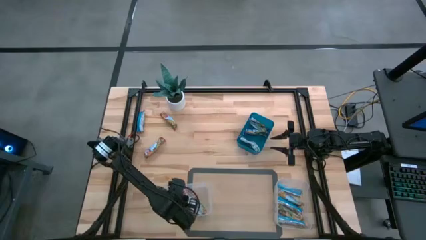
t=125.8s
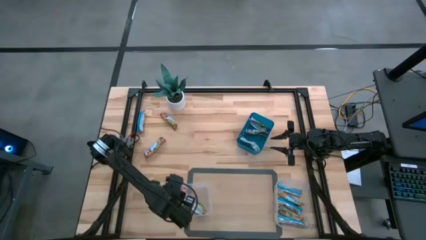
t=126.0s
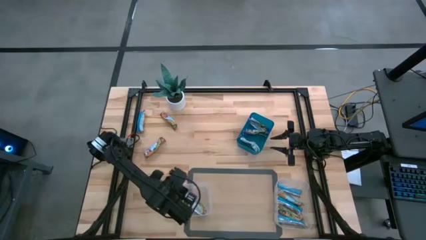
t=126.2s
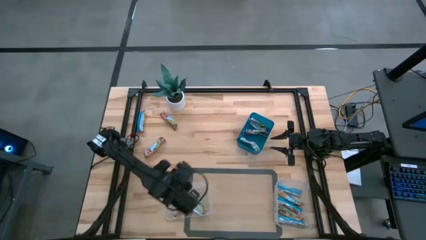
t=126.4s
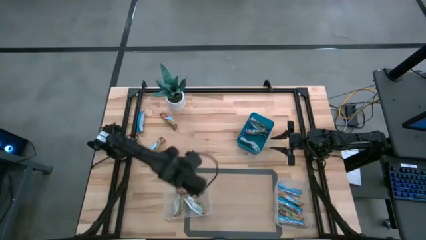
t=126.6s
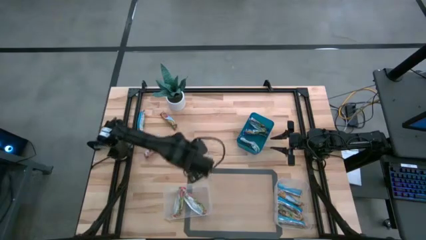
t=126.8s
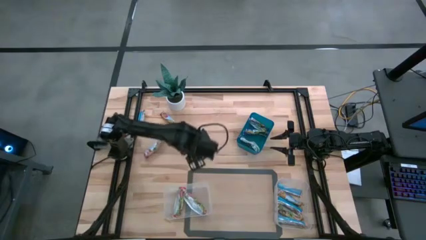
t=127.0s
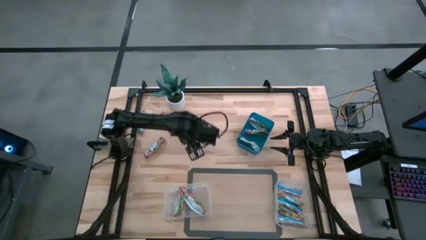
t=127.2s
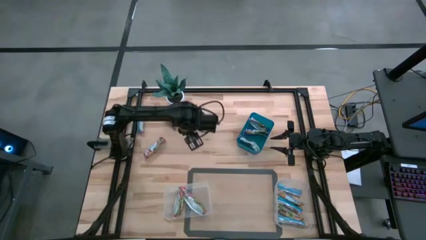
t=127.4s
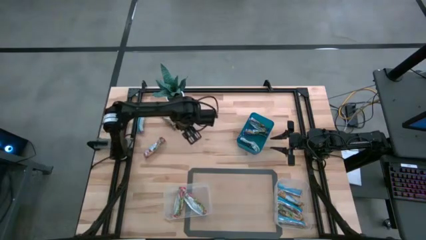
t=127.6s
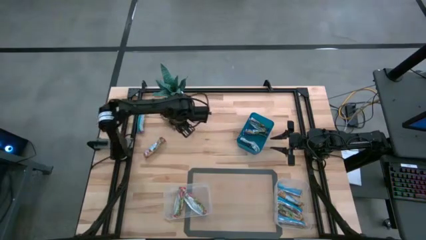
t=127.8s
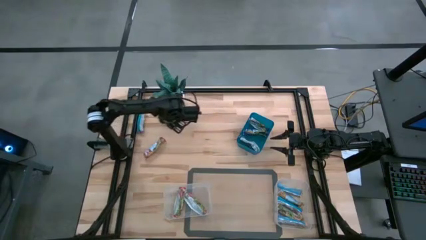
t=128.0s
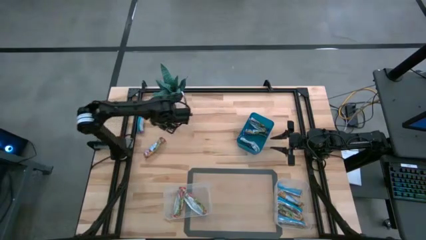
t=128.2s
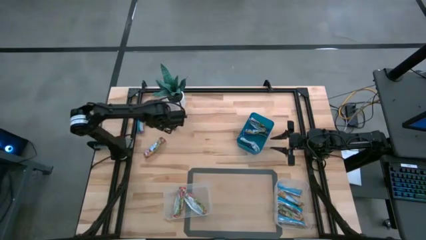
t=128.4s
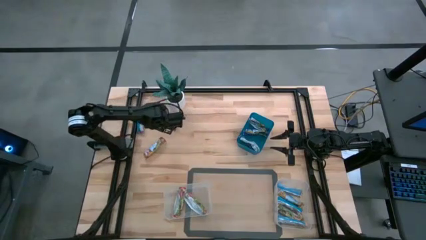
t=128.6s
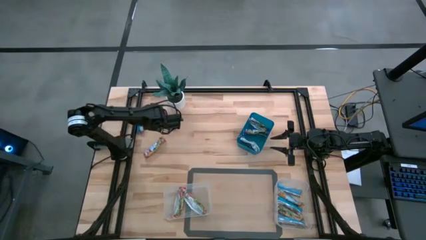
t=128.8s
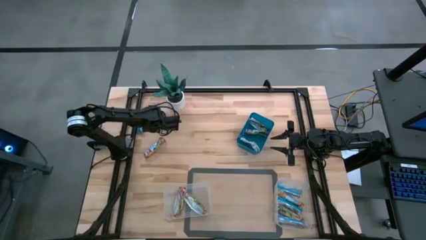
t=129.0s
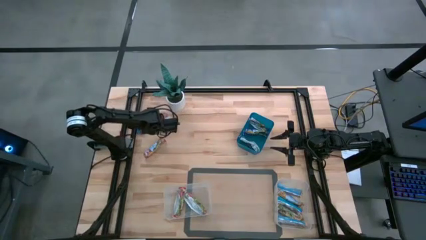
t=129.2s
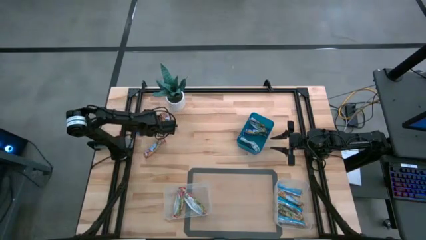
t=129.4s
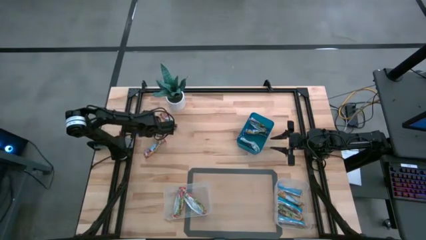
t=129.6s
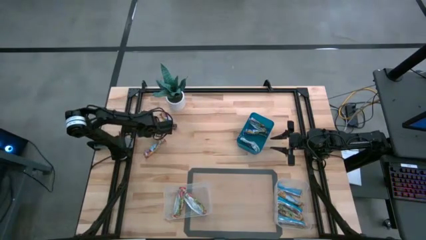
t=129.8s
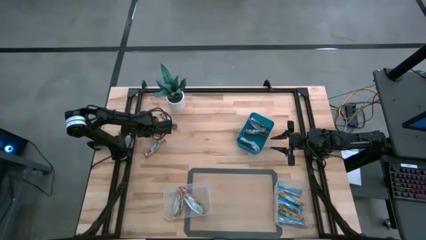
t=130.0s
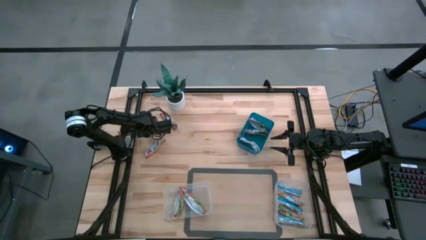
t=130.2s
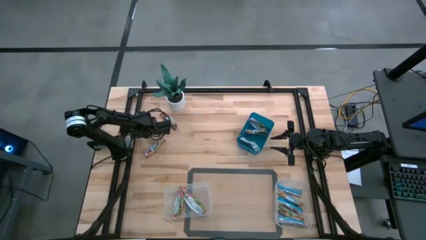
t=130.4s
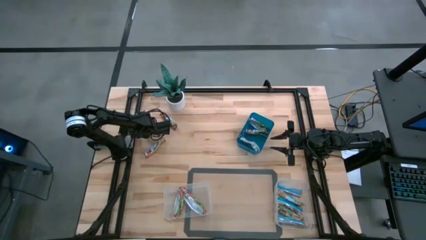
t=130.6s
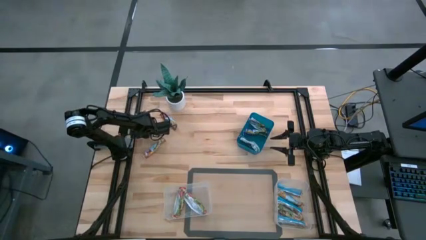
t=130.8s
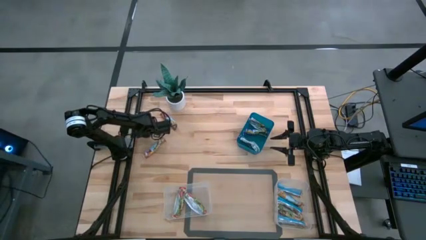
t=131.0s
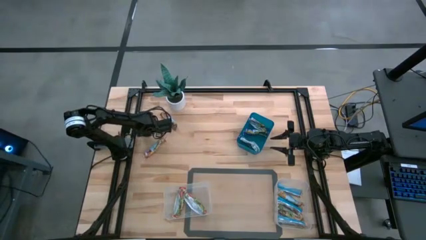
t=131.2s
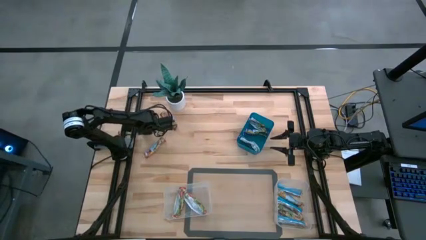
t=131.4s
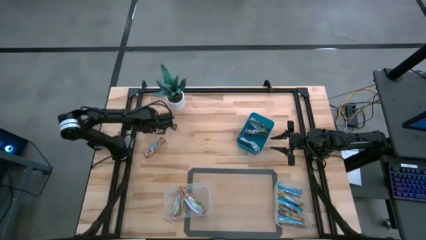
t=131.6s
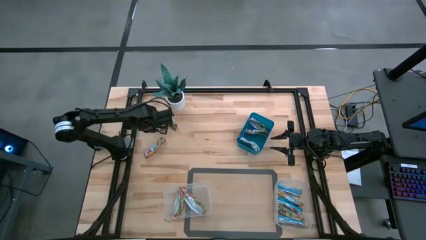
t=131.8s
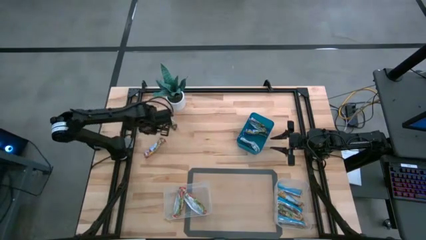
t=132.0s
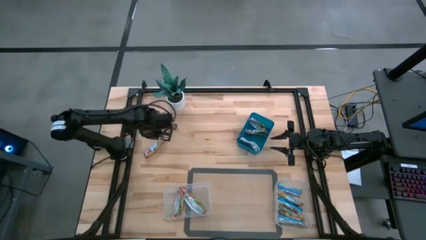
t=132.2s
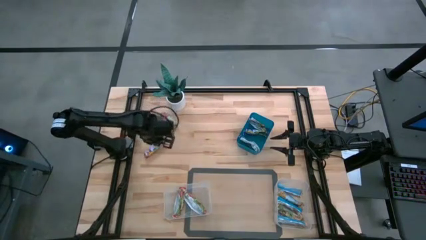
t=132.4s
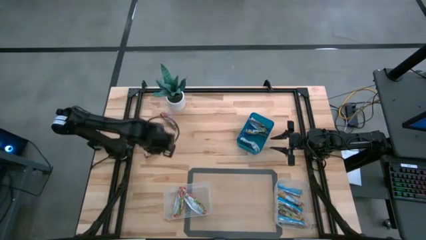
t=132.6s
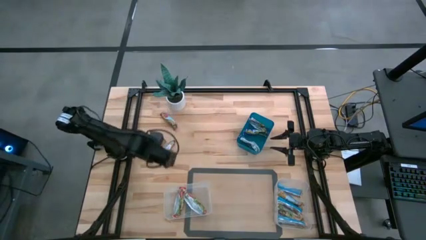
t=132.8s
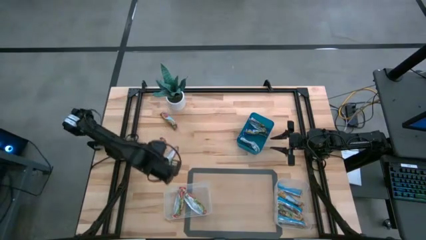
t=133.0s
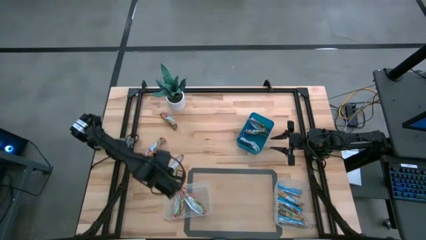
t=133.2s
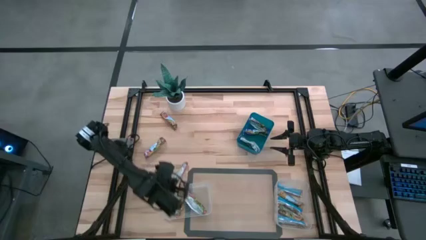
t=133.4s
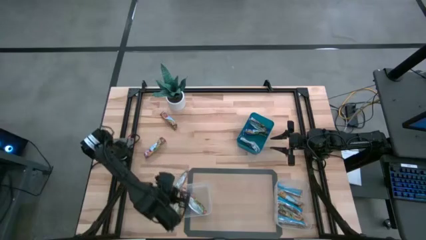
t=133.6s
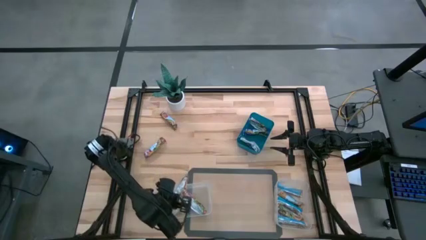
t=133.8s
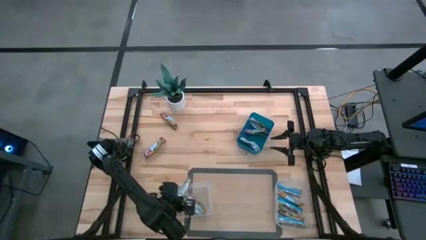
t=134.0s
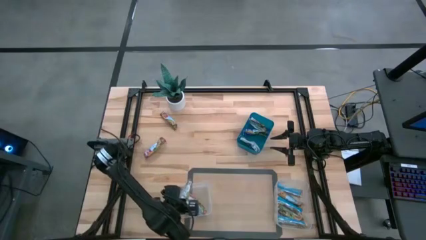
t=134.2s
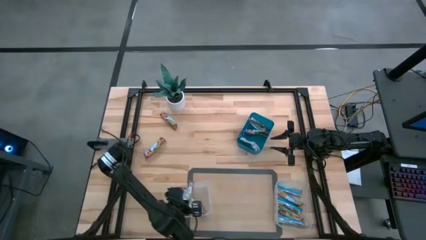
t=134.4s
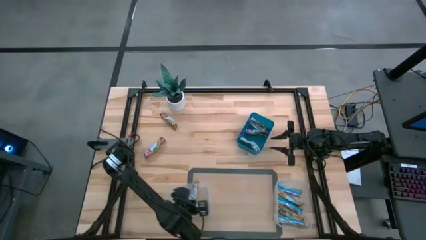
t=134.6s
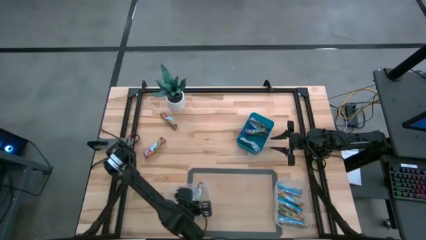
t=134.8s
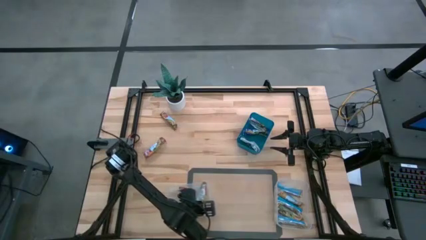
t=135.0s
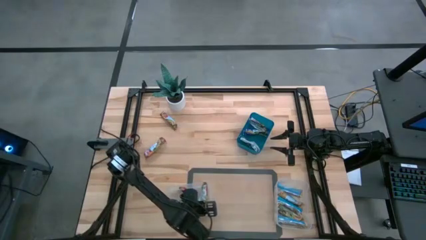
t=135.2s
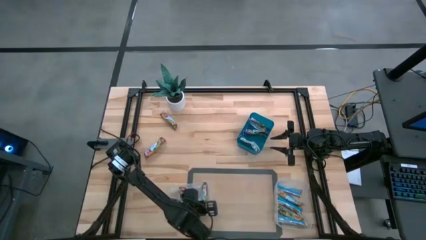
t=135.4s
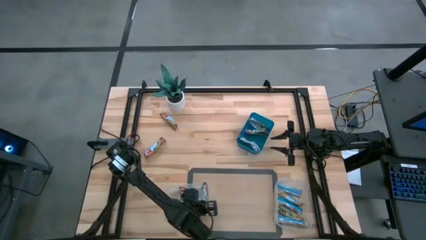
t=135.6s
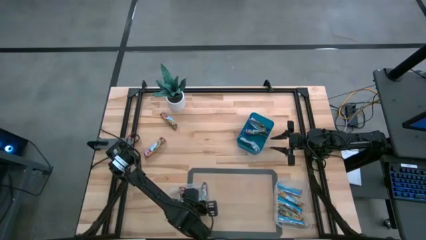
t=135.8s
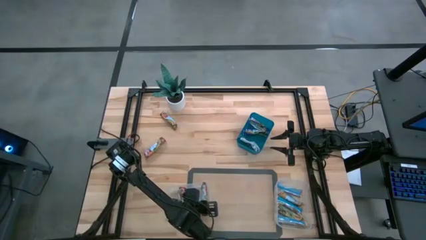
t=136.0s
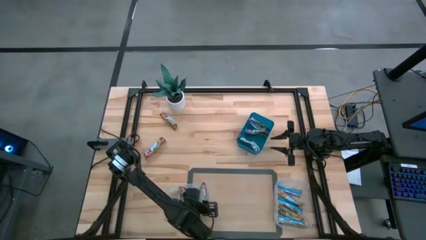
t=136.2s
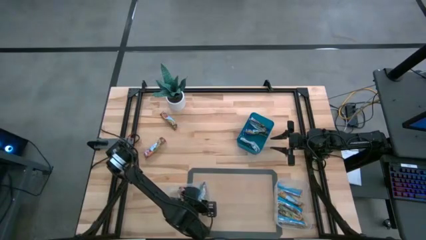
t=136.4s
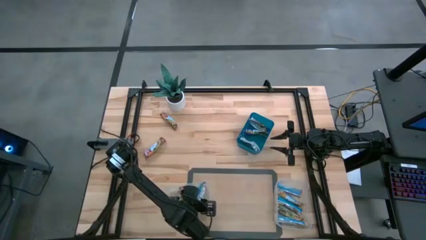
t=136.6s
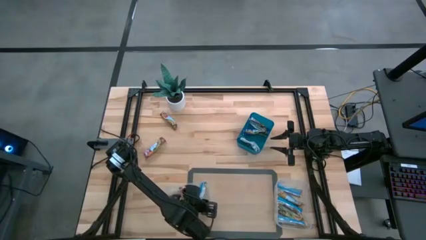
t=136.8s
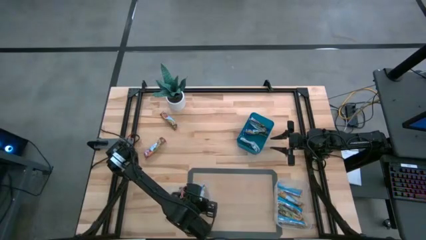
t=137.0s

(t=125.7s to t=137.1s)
Task: Pick and place Granola Bars by type
Put the top left red granola bar into the left transparent bin

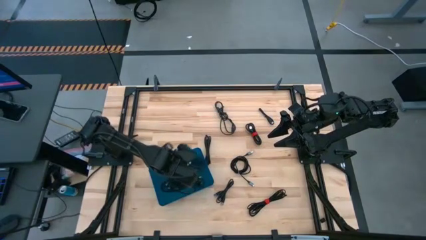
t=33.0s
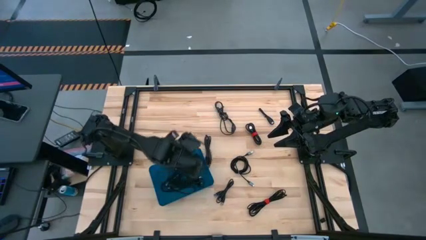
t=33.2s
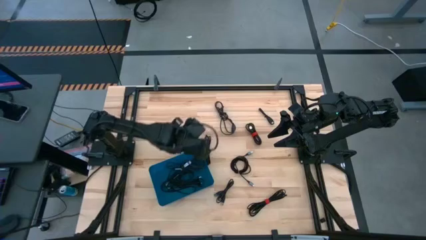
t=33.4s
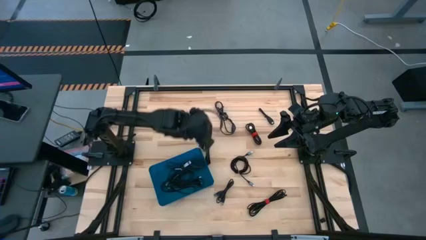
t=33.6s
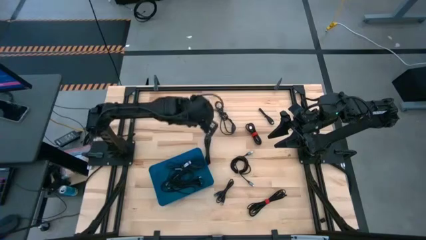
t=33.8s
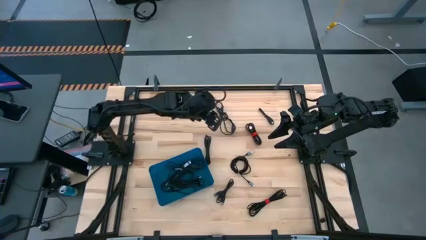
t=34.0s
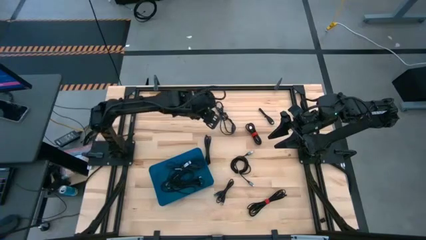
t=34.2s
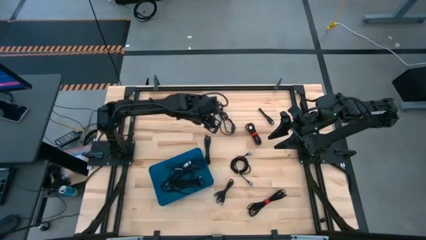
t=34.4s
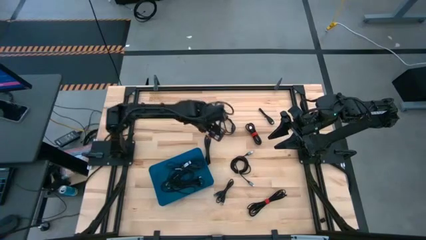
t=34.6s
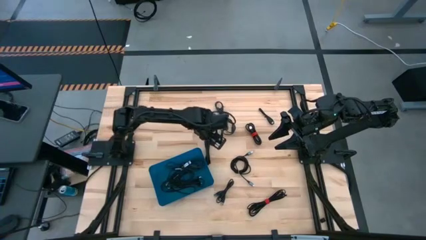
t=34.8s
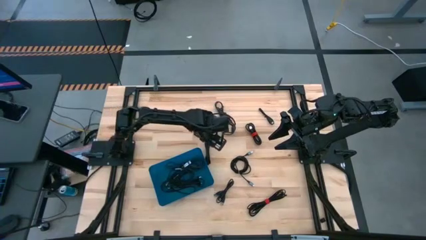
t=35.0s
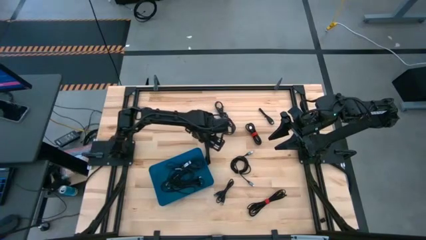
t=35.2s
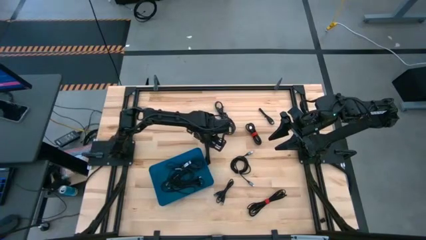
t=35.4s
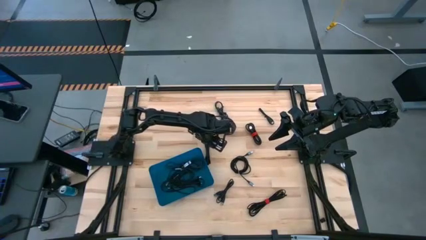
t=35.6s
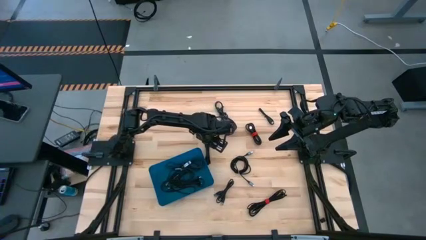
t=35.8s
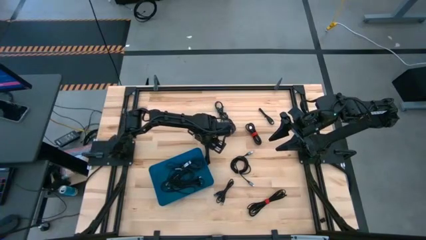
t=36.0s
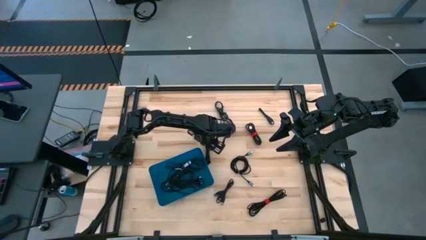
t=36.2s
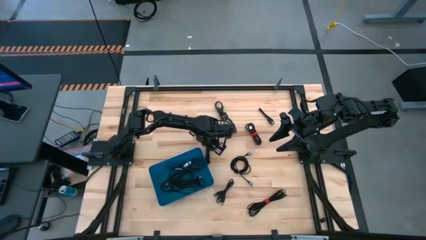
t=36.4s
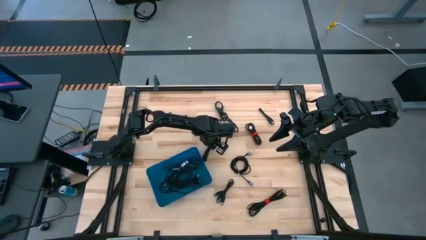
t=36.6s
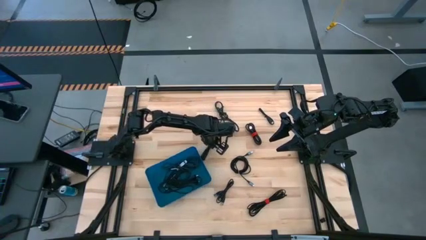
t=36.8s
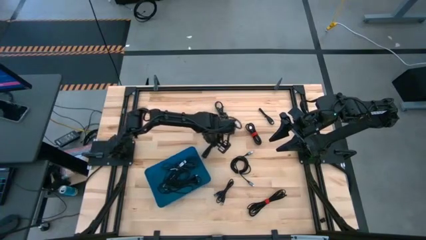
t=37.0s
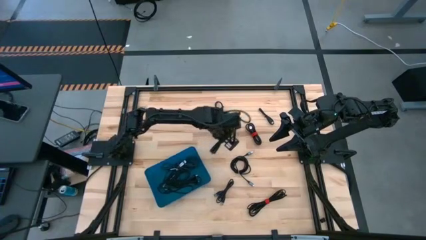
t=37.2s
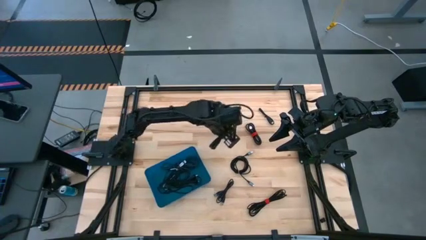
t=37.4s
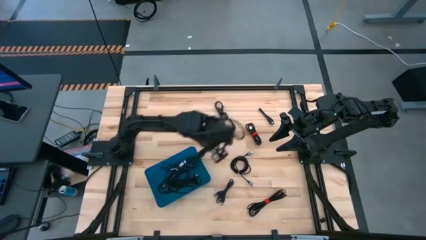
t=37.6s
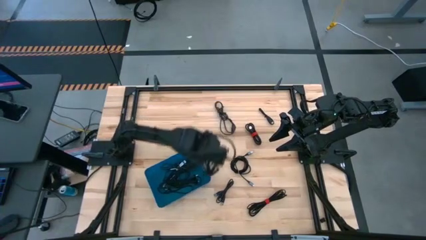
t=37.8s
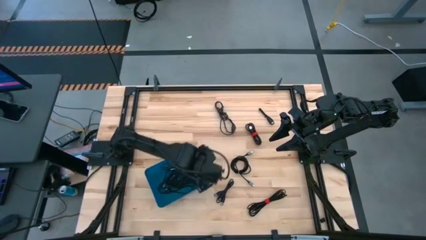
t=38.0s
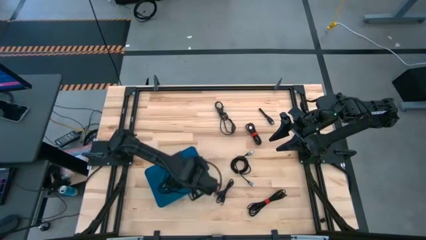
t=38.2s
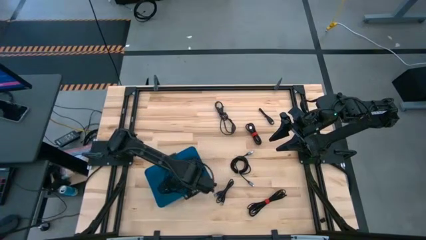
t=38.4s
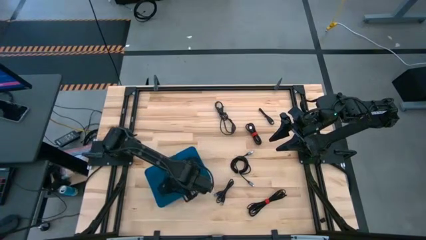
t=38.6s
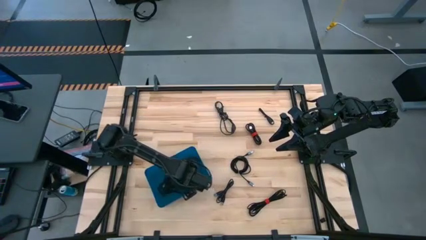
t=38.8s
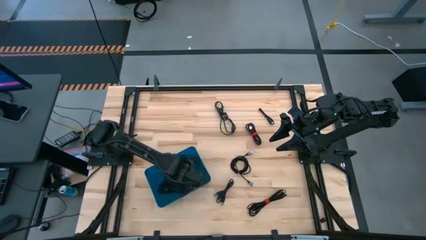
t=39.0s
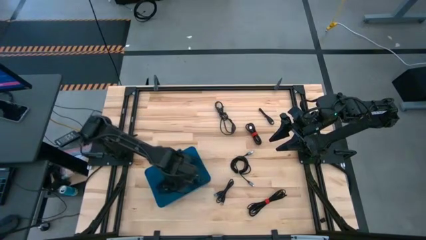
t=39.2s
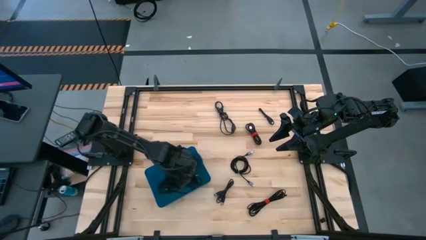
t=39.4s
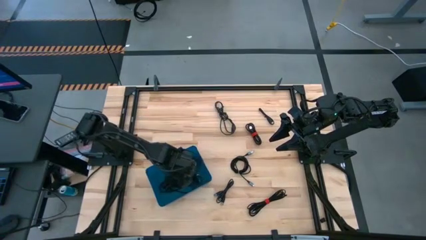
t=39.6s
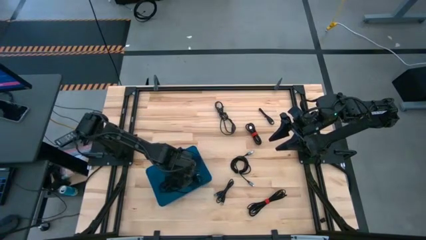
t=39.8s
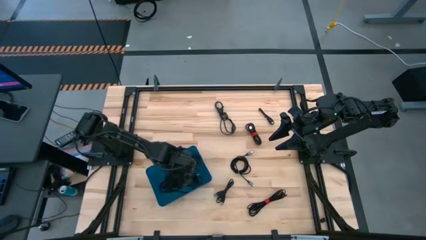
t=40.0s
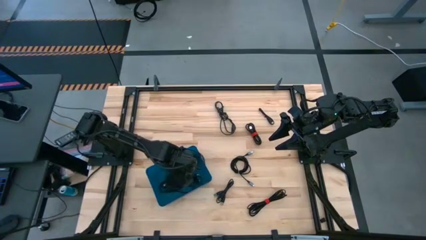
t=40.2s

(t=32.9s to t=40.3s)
Task: Pick and place USB-C Cables
Put the black charger cable into the blue bin
